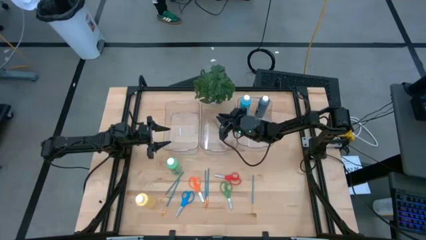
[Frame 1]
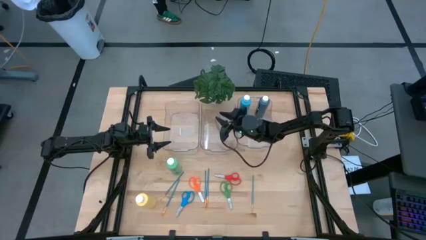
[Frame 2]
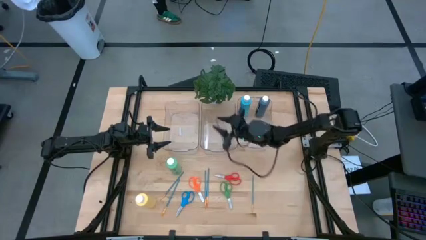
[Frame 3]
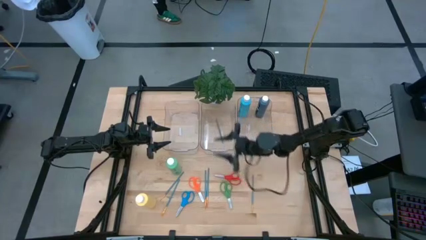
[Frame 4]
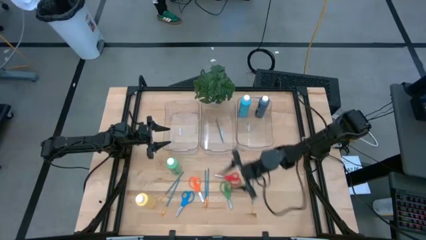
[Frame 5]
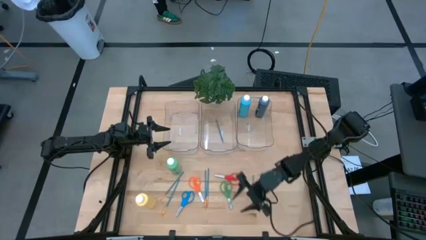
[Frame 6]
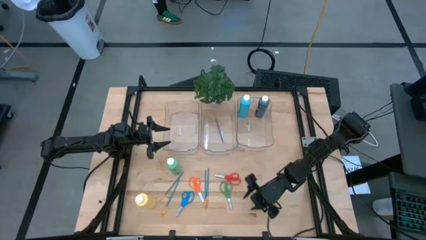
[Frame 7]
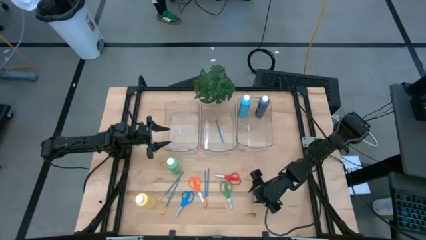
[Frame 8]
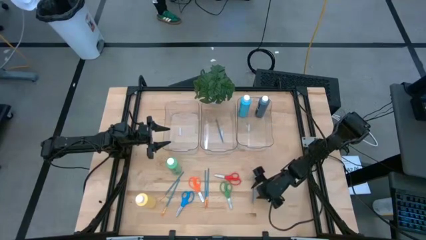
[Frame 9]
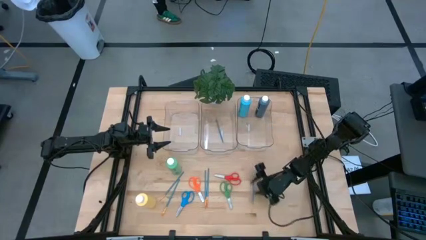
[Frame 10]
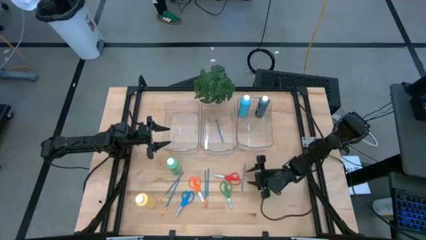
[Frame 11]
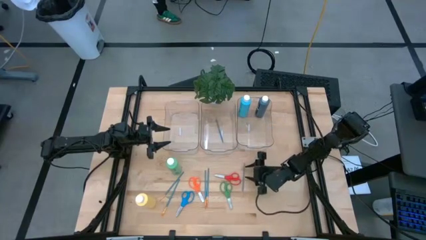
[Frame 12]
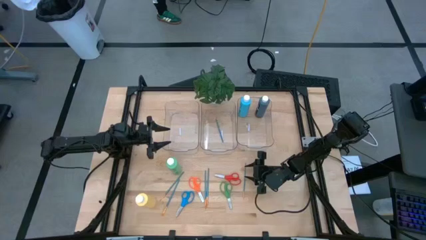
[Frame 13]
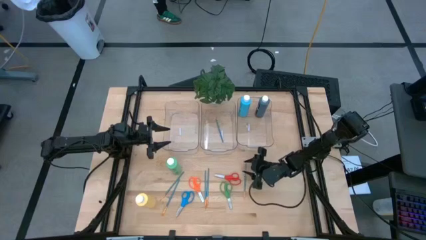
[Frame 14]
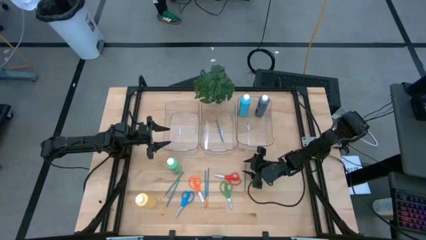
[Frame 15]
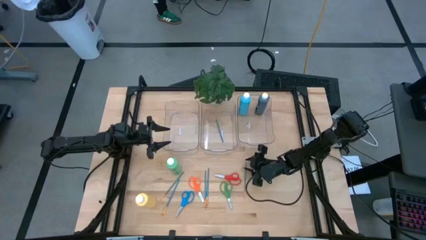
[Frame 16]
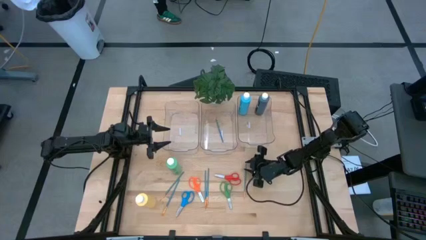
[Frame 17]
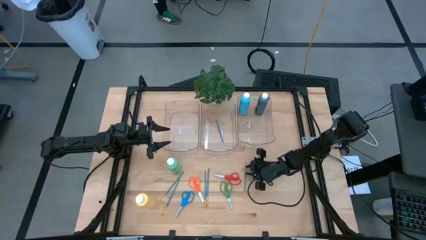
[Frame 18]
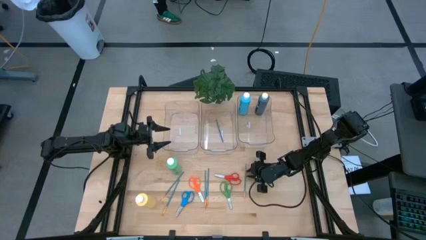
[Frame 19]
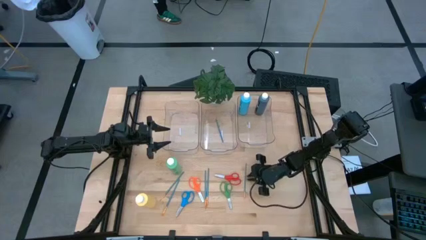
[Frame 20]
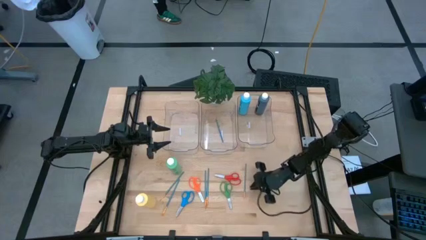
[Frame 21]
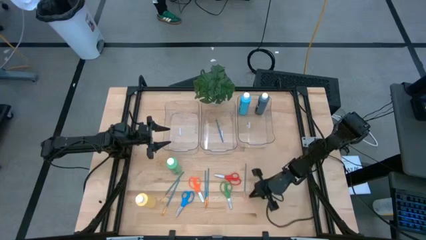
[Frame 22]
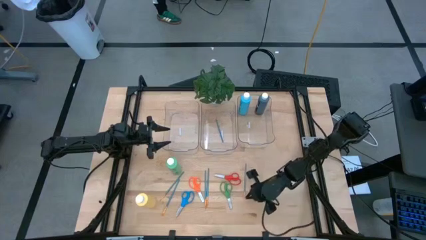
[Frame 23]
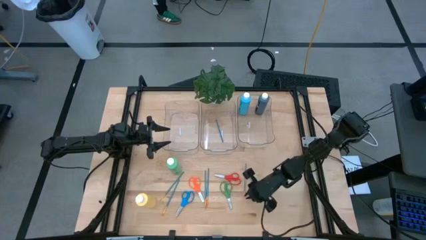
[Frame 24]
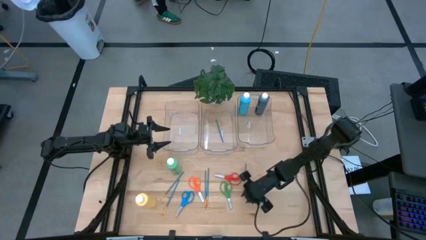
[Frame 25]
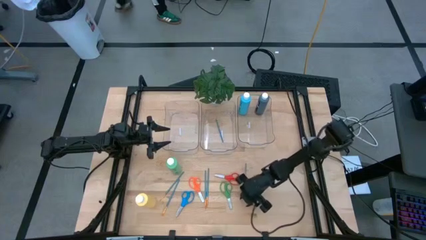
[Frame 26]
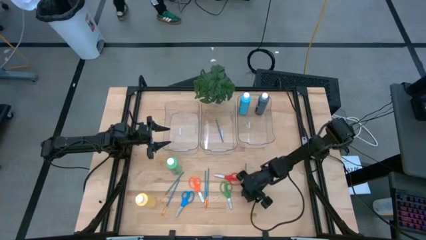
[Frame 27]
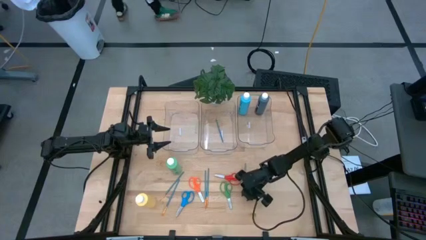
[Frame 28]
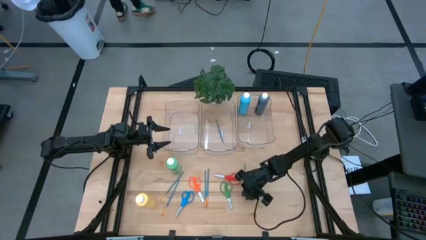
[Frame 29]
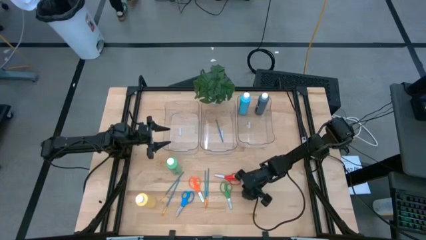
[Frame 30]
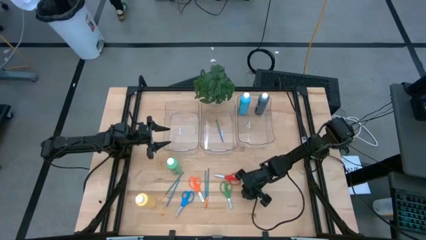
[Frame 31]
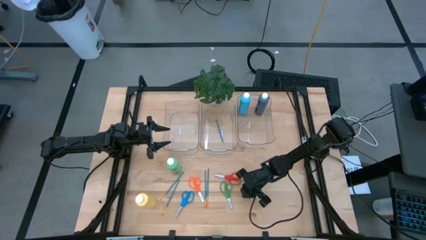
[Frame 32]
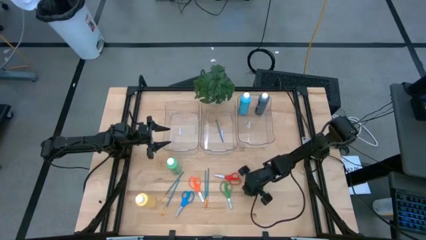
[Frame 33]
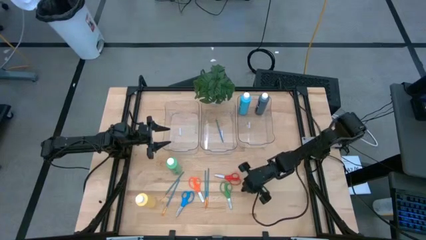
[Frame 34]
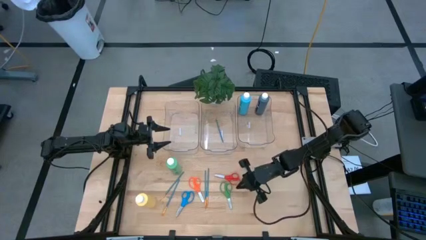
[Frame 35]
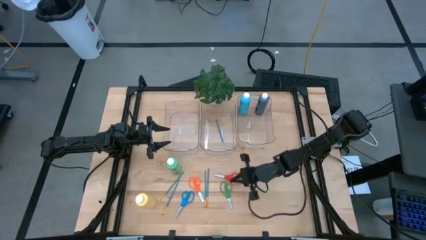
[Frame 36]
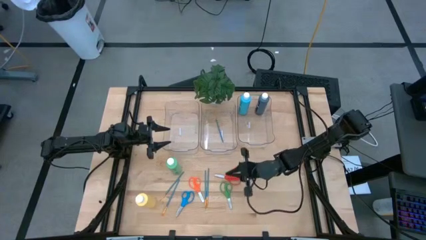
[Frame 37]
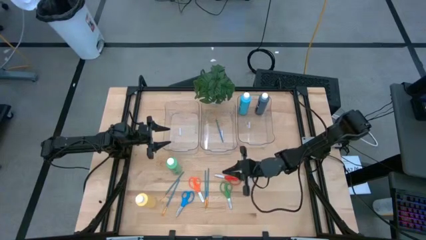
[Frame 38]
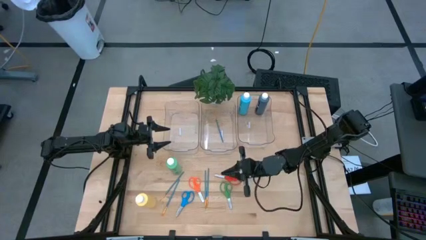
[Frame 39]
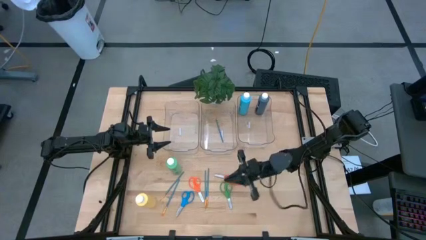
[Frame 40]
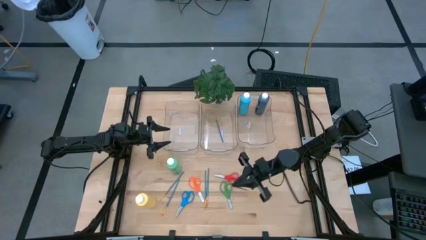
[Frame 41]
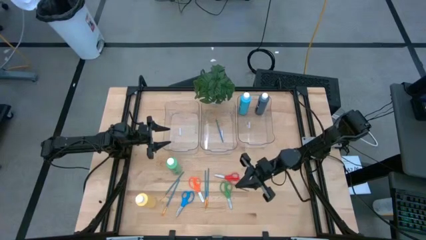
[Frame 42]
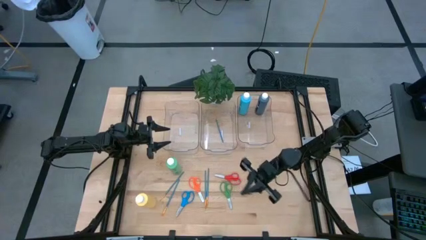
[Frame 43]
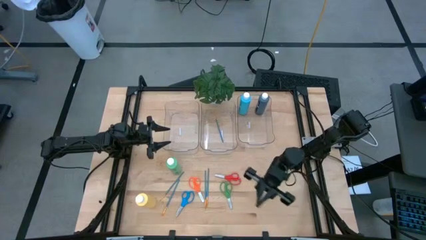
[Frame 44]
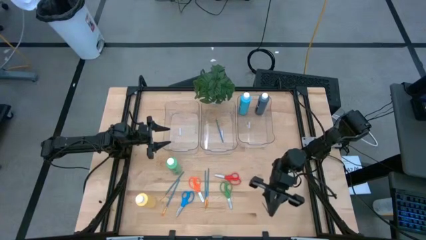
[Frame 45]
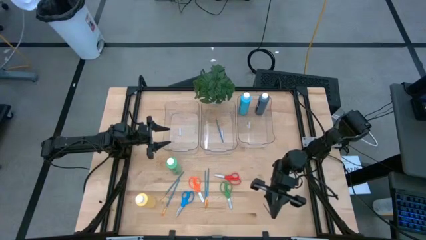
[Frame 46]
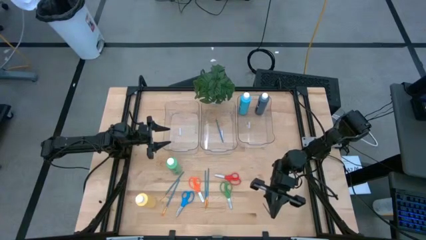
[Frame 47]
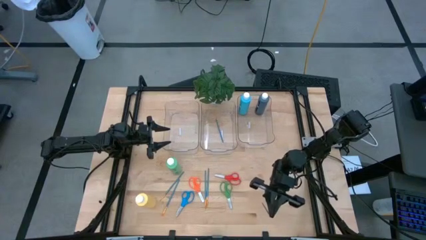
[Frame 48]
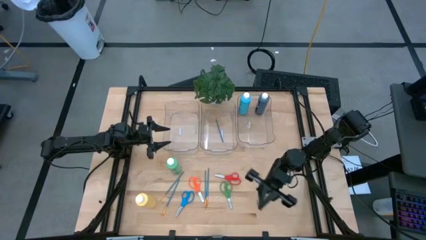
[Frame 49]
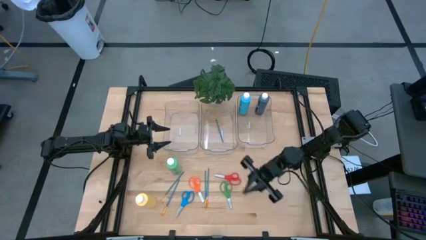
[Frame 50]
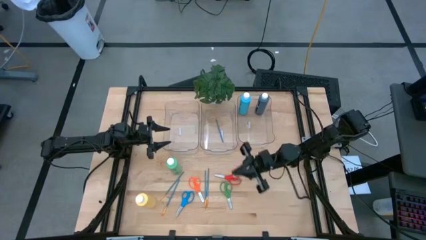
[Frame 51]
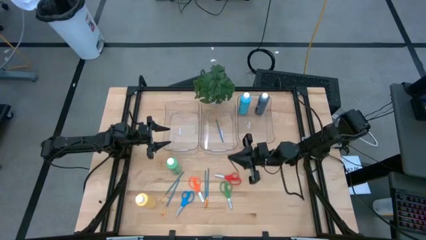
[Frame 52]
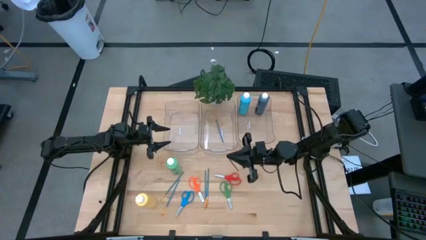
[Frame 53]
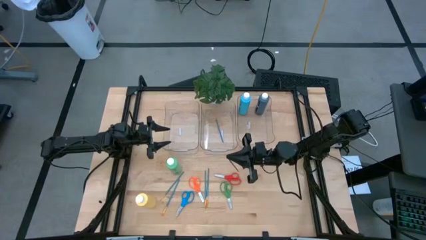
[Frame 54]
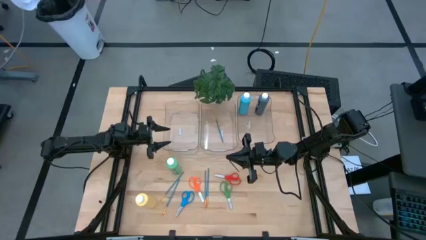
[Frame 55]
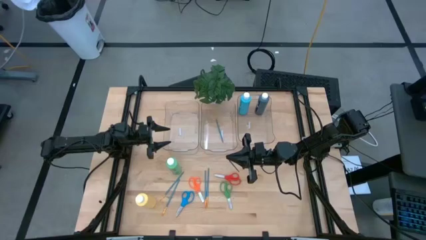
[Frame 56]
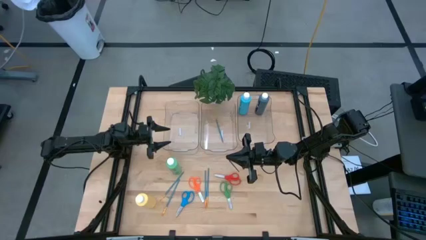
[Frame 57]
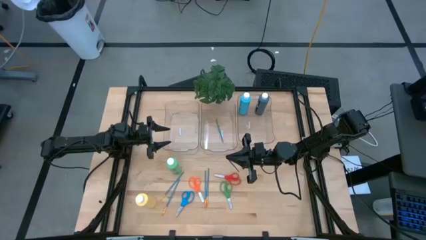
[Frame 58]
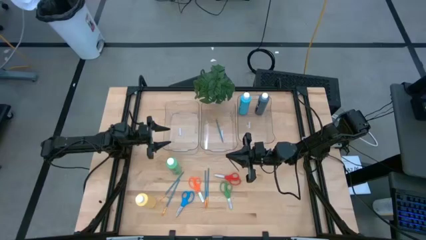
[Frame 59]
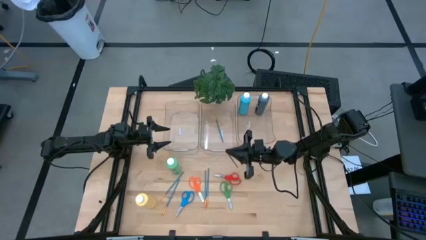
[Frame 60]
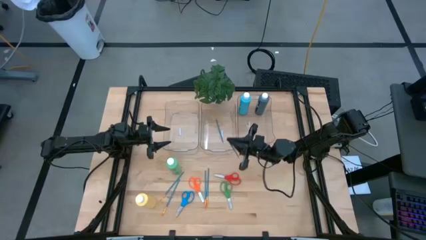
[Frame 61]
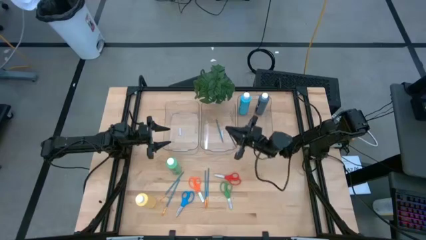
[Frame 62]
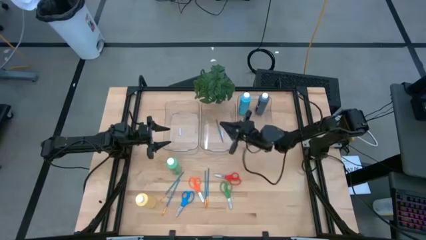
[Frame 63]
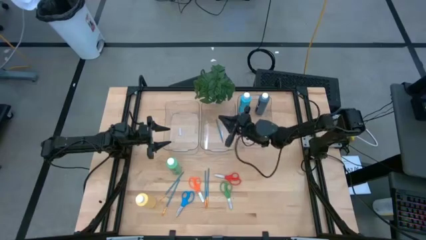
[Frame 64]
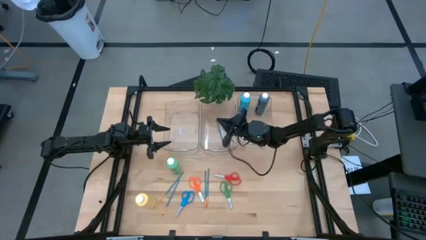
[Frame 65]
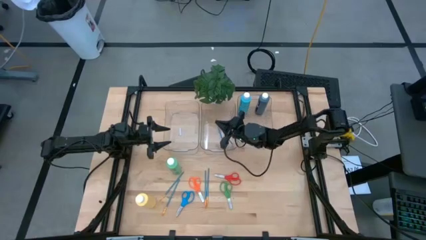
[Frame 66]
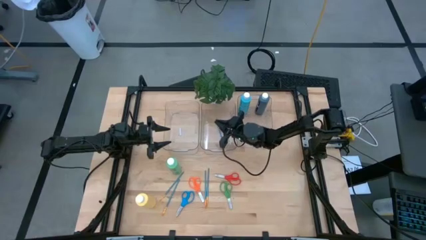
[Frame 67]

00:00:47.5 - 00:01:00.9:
Task: Pick & Place Paint Supplies
Put the blue paintbrush into the middle transparent bin

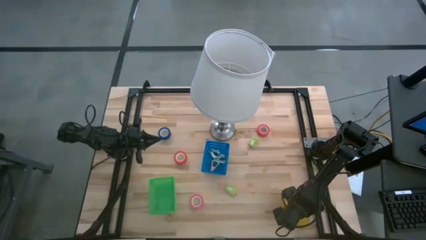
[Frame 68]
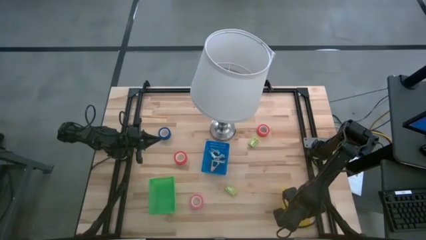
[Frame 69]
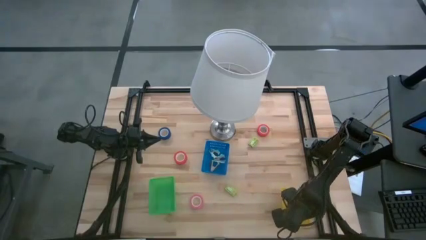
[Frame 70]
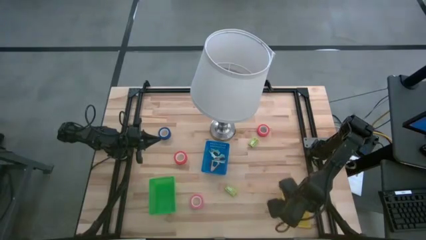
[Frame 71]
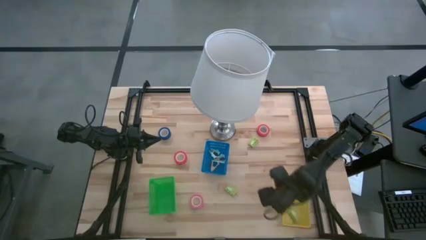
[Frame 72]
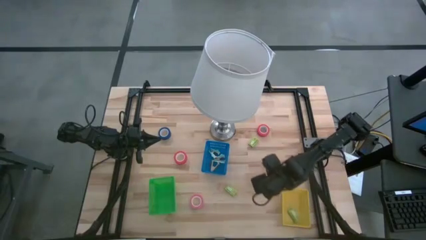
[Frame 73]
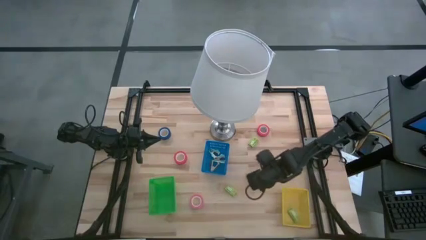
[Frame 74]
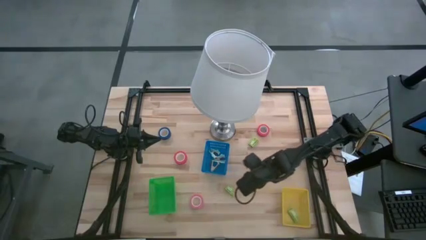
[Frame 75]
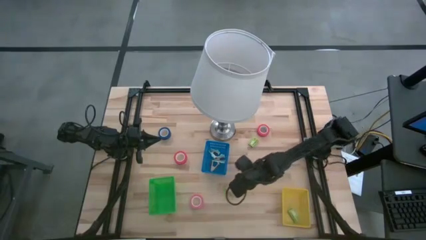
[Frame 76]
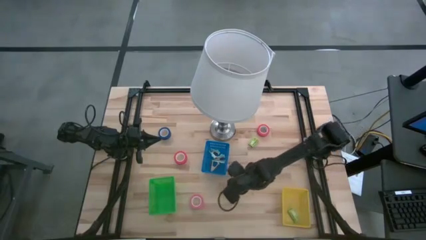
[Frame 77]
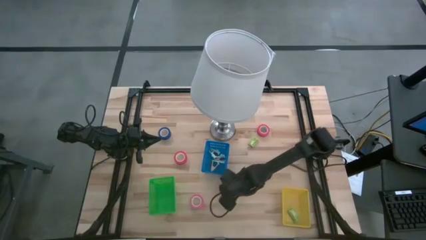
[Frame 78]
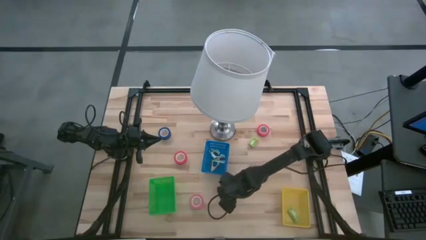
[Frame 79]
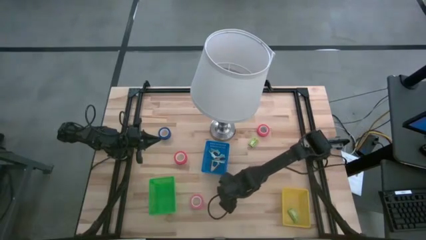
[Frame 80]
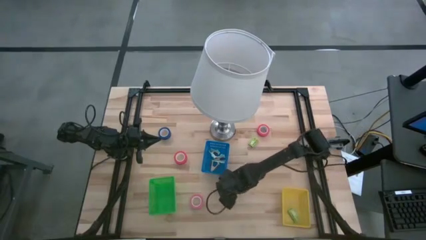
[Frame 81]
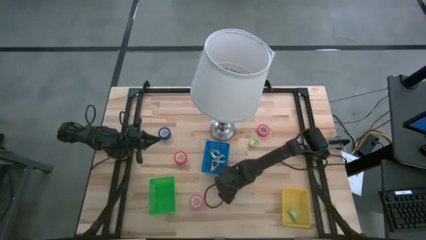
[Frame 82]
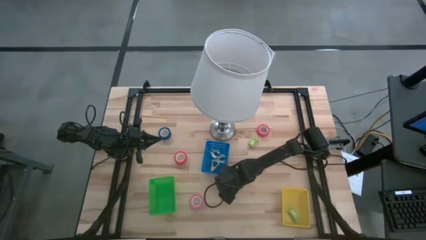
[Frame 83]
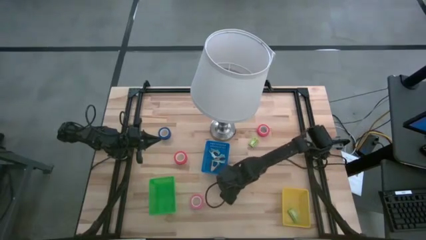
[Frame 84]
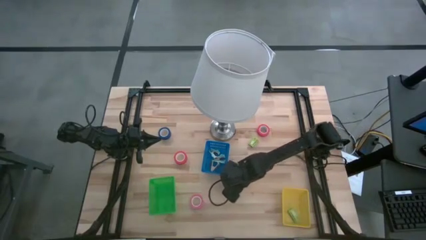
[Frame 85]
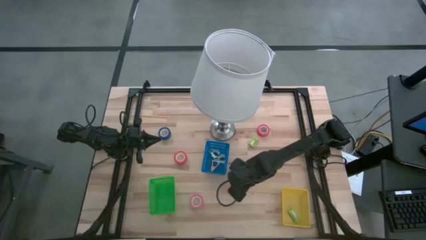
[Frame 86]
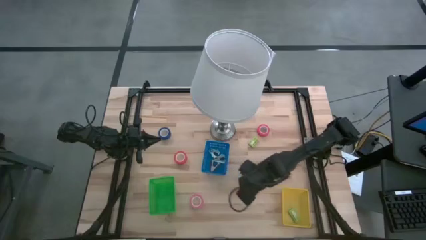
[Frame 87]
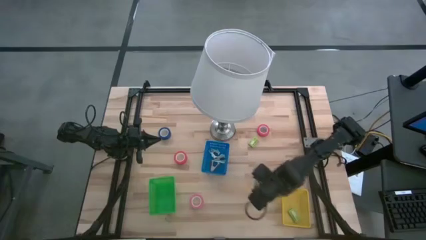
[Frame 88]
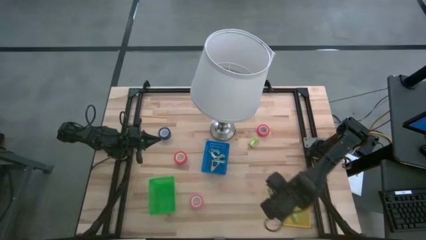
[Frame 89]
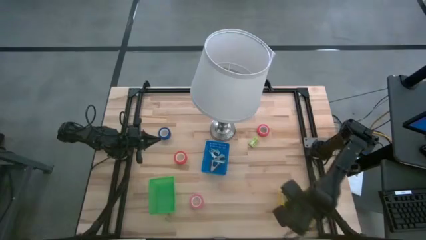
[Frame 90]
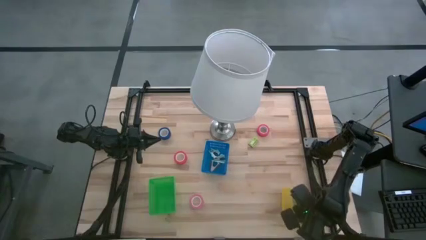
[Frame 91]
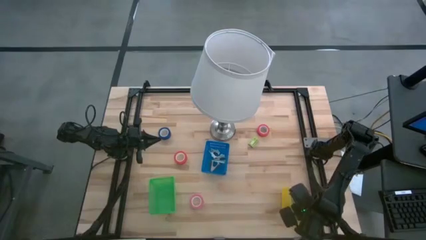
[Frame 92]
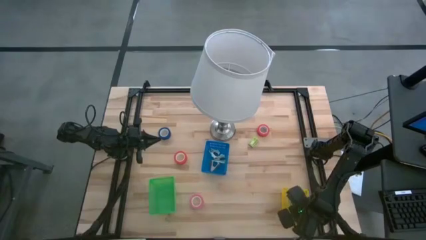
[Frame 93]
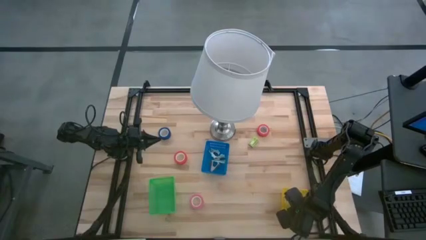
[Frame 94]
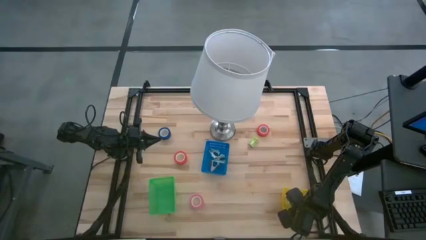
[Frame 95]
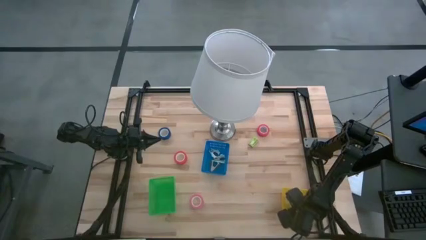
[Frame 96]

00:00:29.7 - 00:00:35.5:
Task: Pick and place Stapler, Stapler remover, tape
Put the bottom green staple box into the yellow bin
